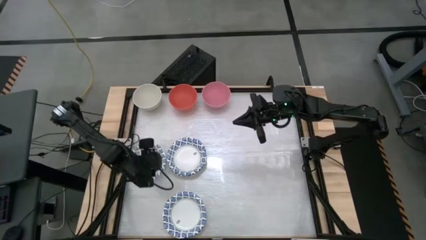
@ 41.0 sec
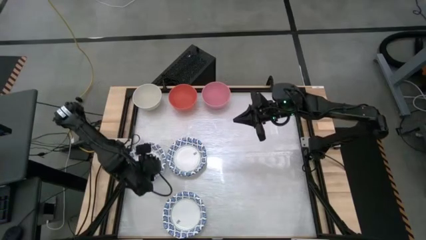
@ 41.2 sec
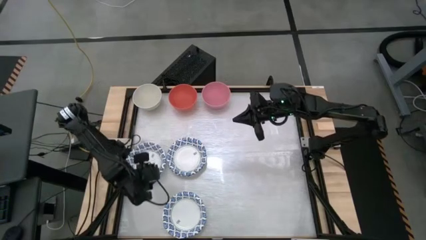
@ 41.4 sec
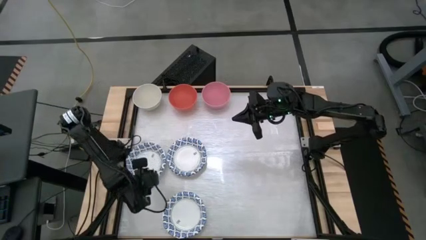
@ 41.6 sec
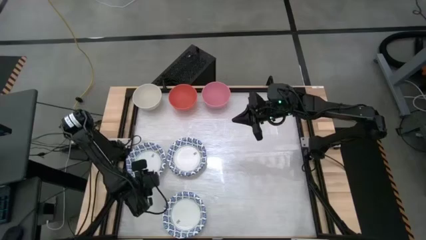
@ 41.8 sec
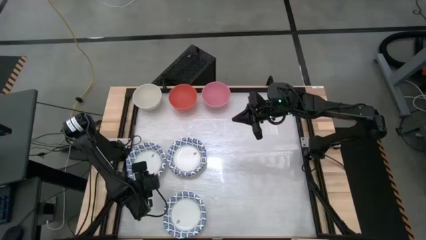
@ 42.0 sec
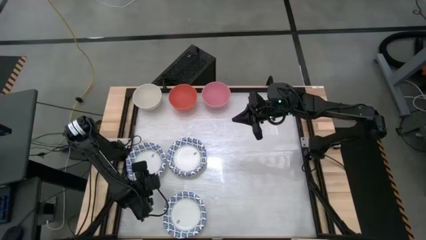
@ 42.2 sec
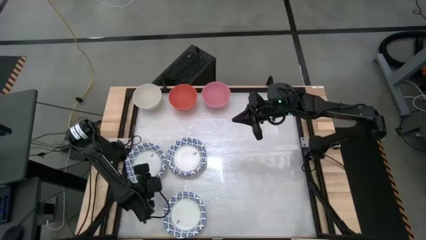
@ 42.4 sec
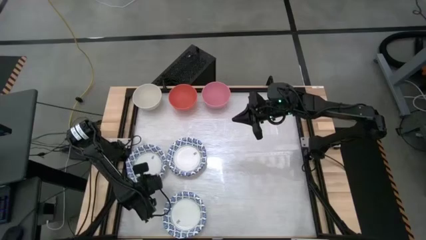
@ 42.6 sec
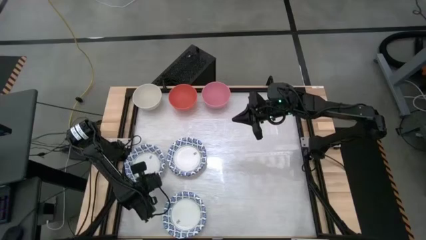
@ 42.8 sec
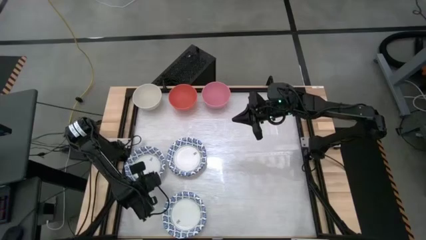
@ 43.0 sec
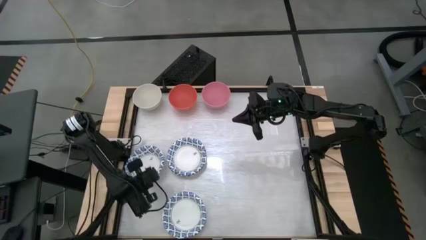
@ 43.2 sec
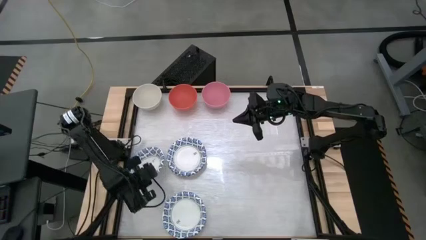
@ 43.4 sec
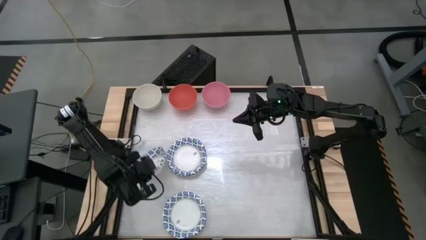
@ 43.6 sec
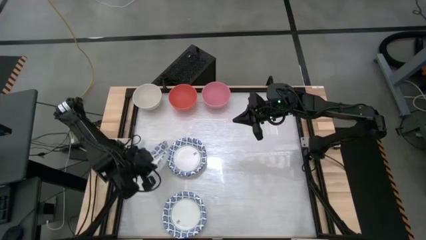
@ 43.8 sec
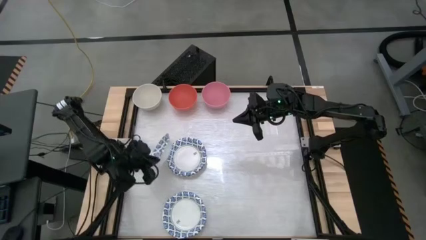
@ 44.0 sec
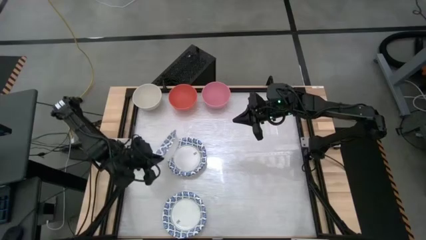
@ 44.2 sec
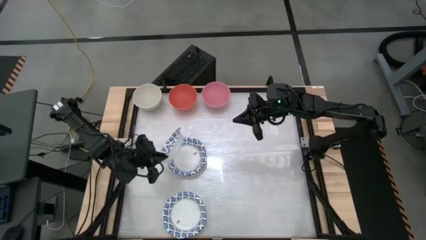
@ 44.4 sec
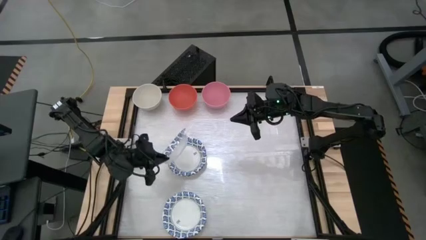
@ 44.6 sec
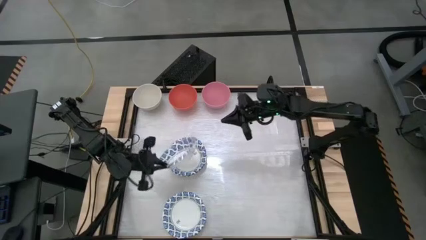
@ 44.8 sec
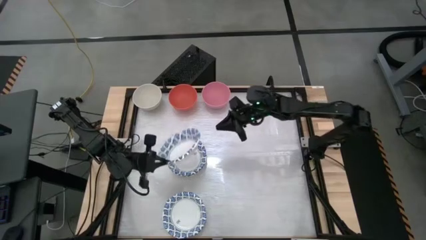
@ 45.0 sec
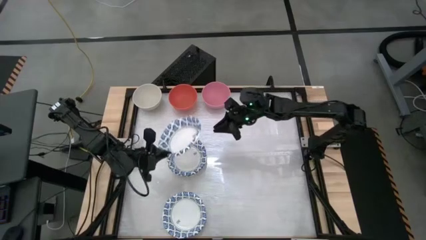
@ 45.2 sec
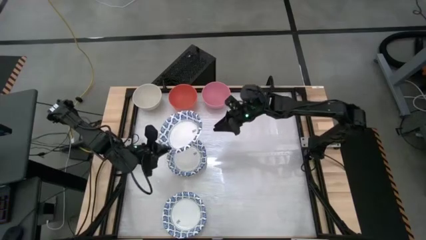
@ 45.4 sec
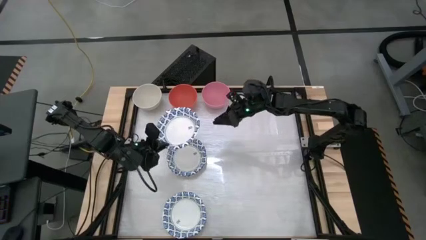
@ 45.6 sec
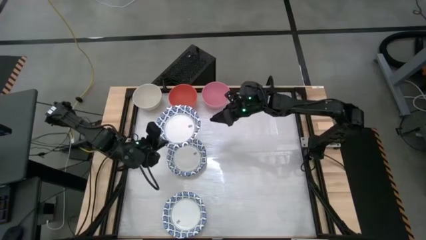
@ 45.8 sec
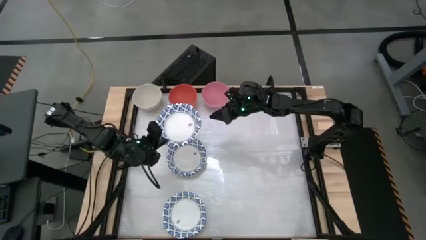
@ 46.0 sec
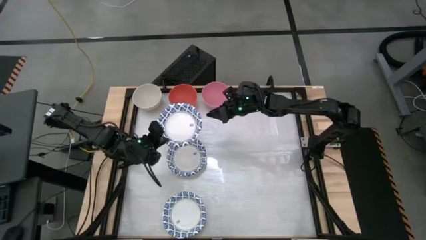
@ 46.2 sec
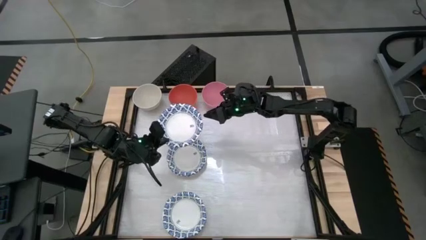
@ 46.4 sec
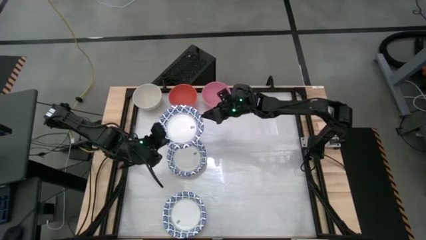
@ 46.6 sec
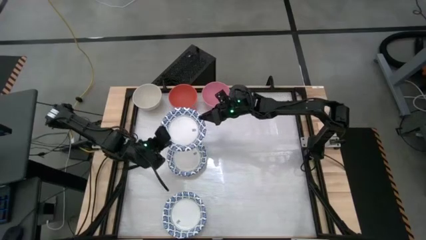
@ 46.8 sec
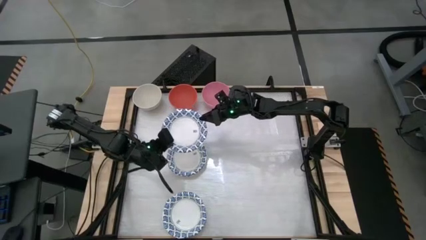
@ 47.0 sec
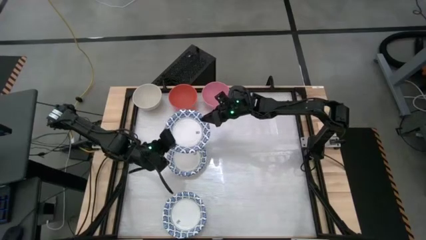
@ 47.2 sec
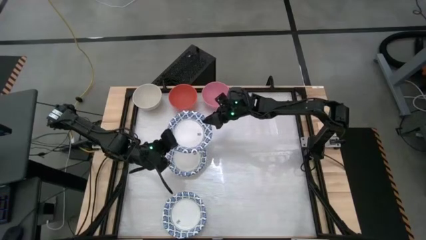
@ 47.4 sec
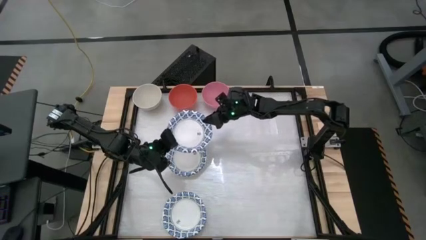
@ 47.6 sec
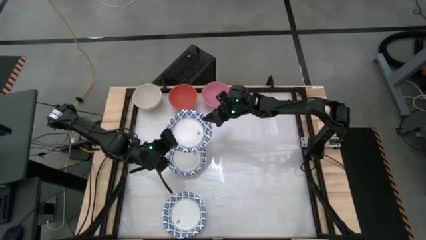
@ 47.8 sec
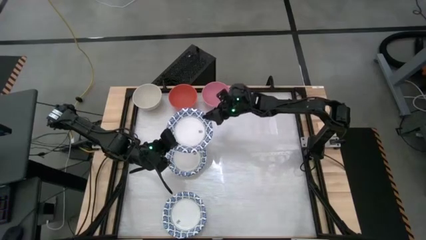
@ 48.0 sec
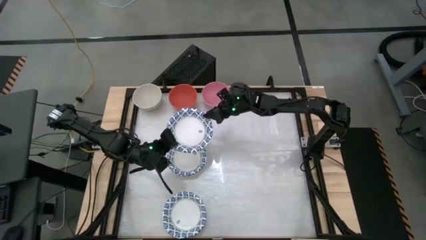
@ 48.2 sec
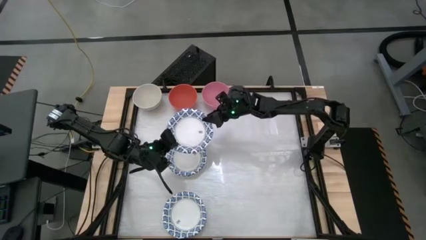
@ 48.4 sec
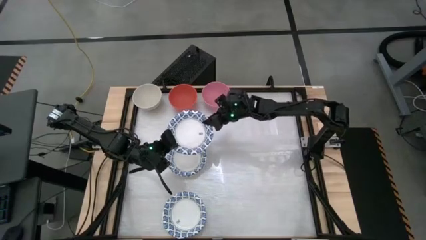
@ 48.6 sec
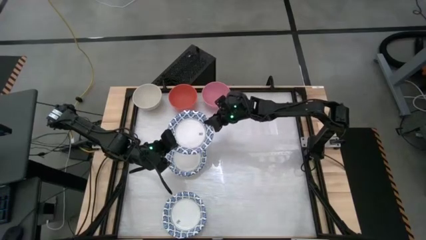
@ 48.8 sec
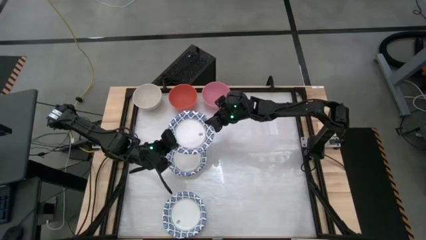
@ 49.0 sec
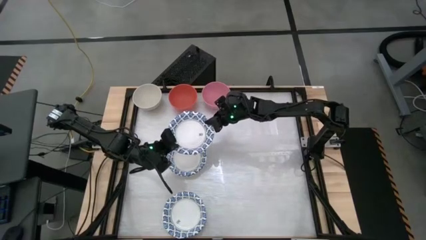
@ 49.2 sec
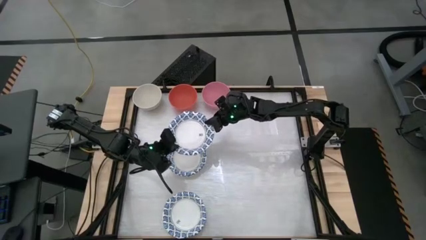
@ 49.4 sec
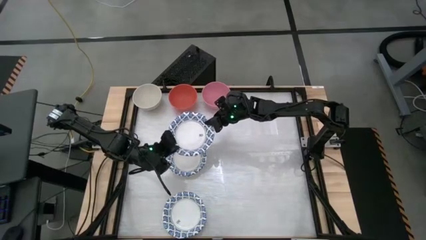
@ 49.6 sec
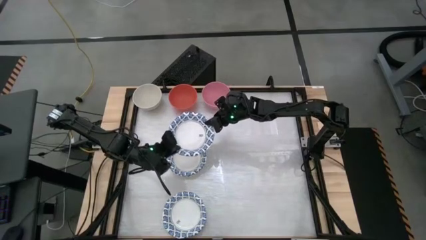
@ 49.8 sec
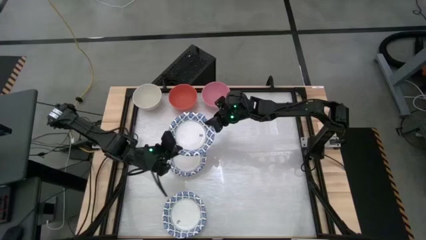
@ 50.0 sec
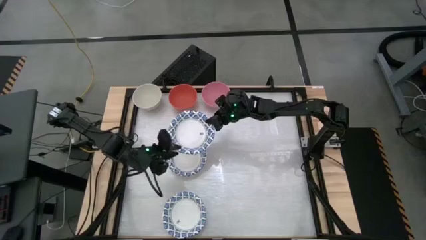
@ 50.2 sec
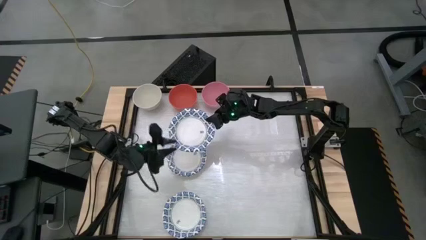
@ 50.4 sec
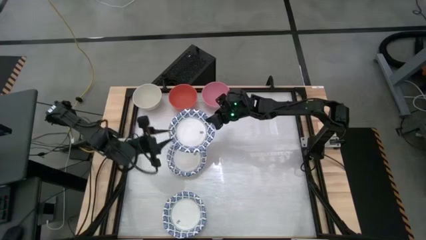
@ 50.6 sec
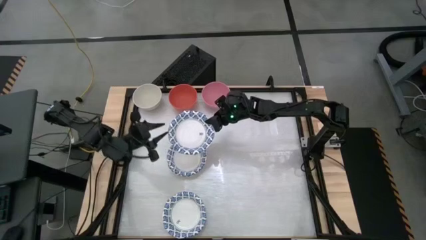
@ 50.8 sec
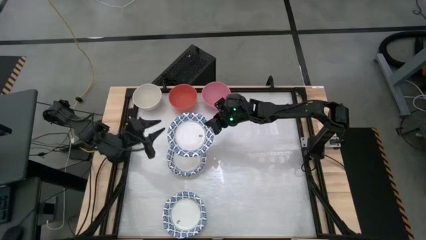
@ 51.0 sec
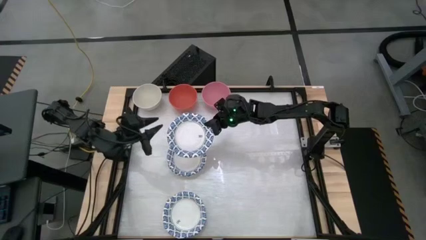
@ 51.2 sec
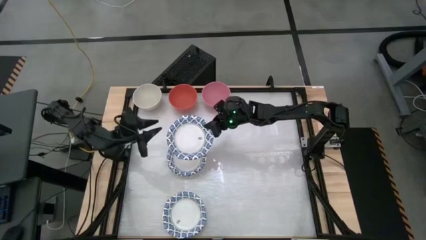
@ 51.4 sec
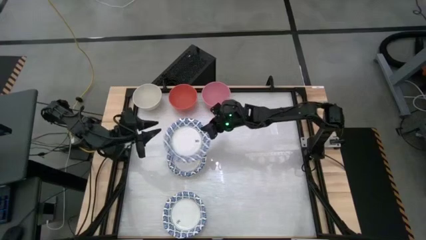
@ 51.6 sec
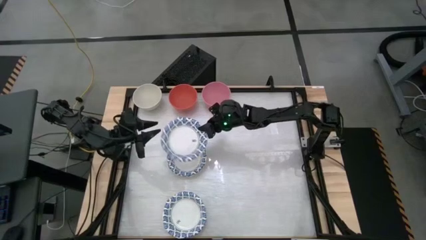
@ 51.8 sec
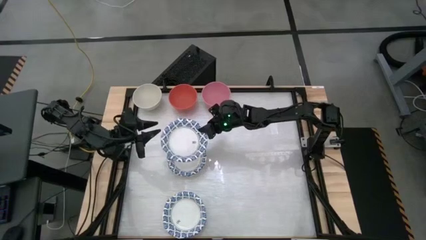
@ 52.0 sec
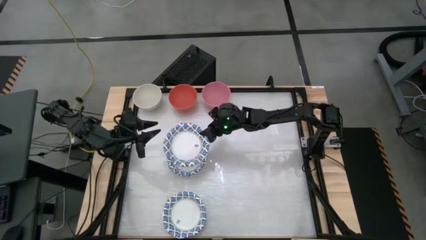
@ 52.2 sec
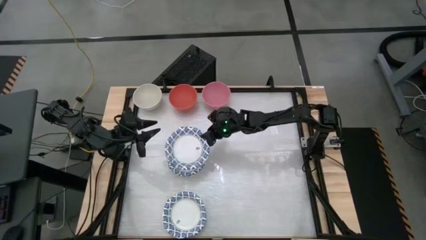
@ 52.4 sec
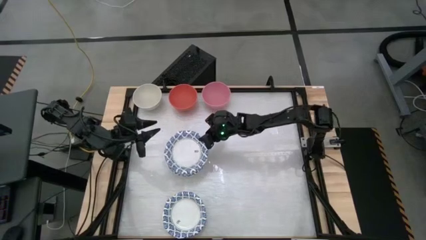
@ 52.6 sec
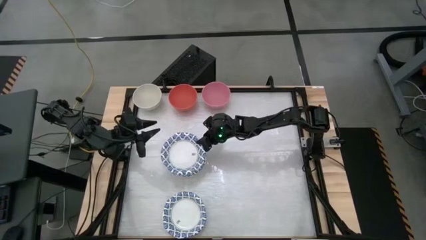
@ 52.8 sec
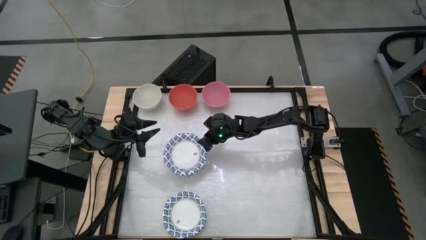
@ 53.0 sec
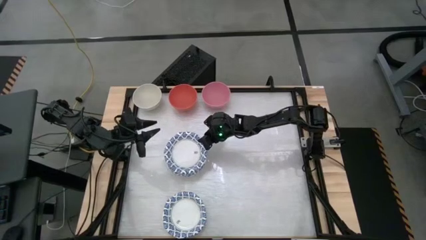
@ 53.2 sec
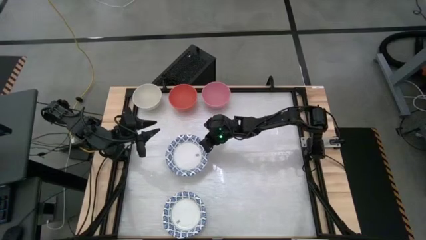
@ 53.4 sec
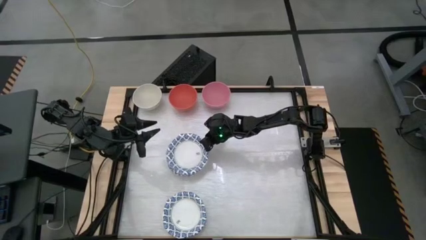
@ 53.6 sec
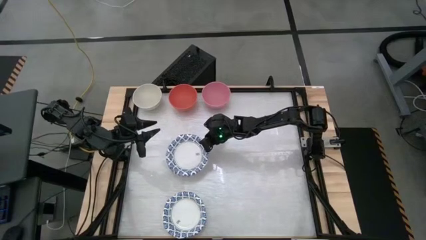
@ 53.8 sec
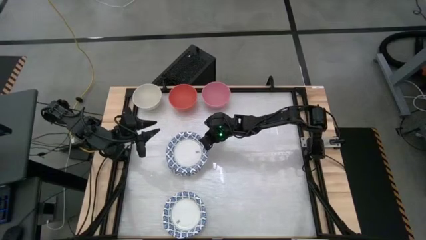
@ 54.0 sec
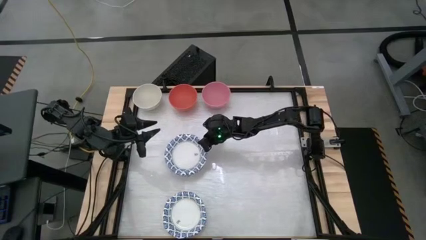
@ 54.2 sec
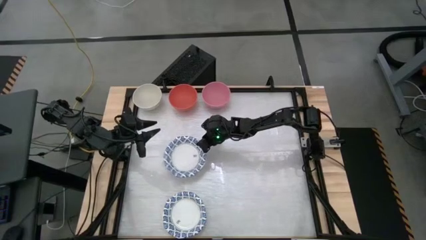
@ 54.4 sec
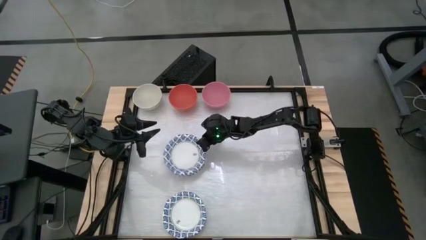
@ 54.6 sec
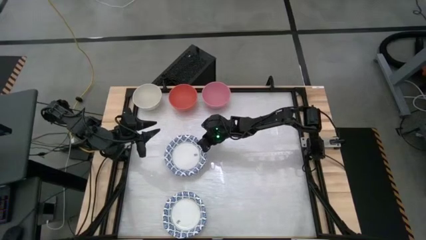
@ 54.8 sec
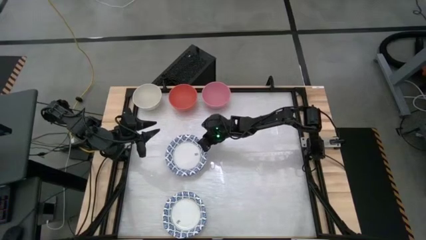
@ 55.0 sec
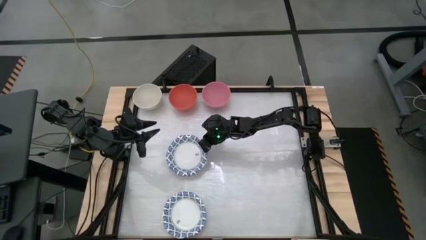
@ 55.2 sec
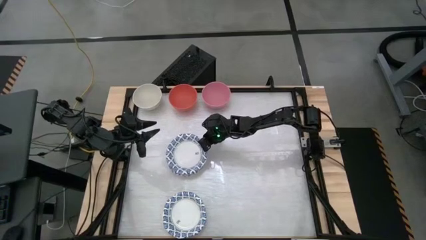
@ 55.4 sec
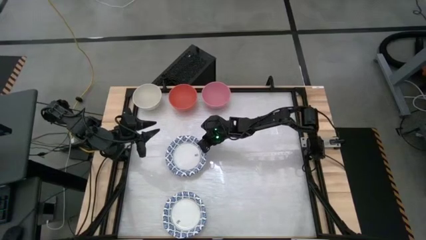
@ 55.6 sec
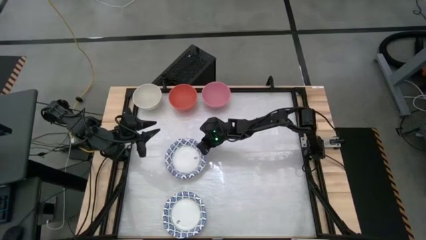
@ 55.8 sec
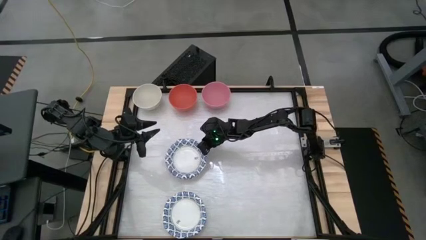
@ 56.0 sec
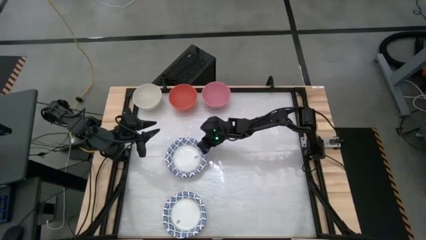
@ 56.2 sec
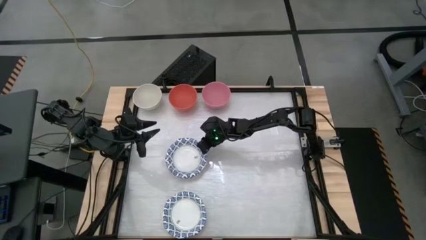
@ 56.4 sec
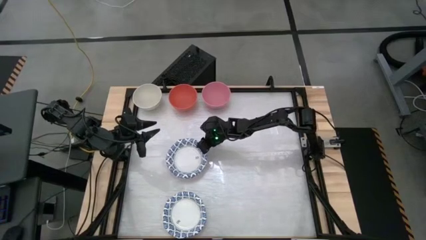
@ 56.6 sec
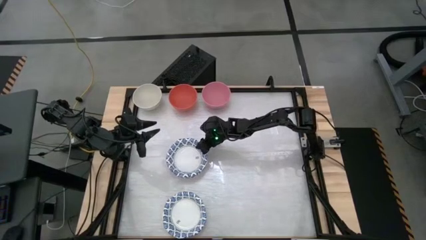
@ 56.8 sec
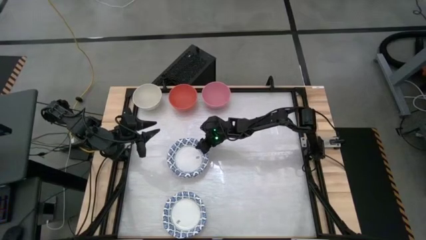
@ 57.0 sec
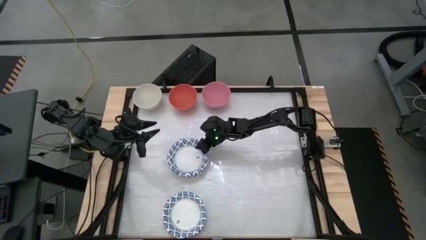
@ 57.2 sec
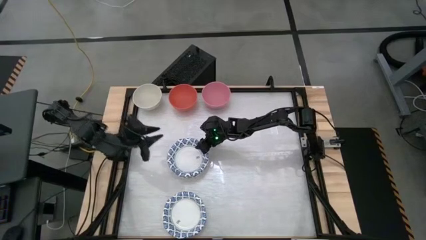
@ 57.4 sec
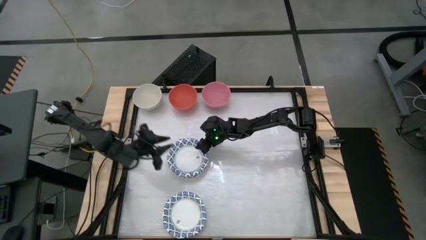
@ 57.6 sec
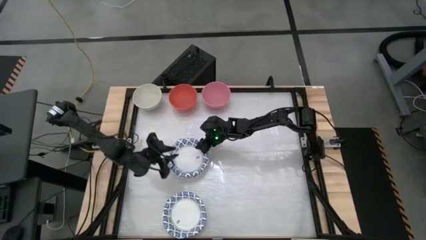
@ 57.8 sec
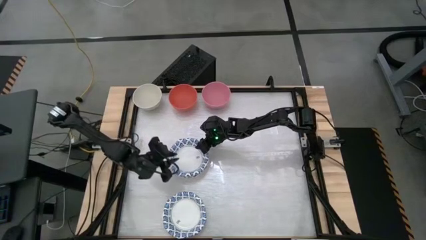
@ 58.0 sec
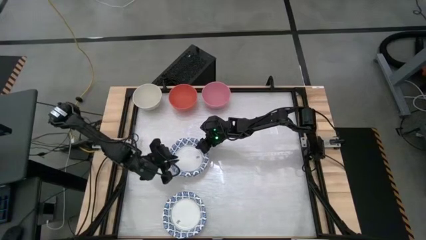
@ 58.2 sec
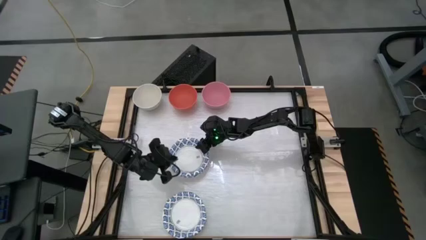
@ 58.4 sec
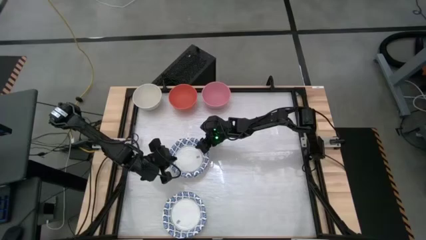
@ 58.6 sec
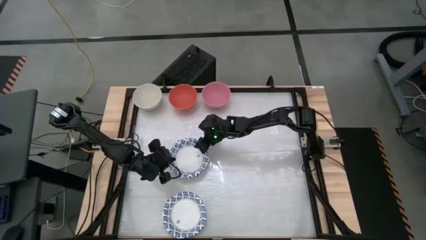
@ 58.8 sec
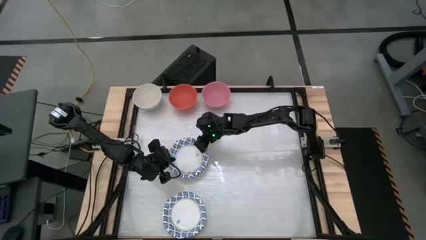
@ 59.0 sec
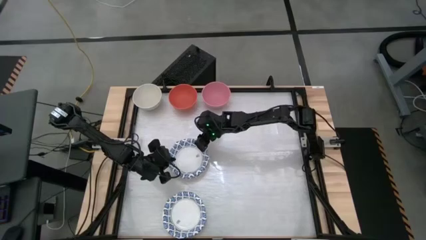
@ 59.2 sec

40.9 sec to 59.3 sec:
Task: Nest bowls inside each other by size order
Stack the white patterned bowl on top of the white patterned bowl
